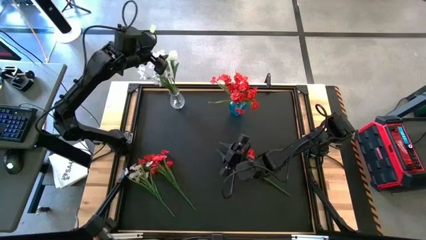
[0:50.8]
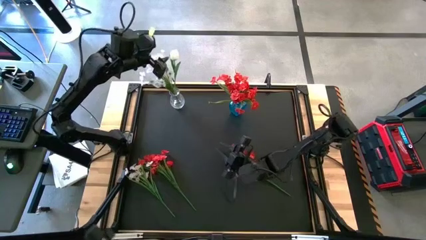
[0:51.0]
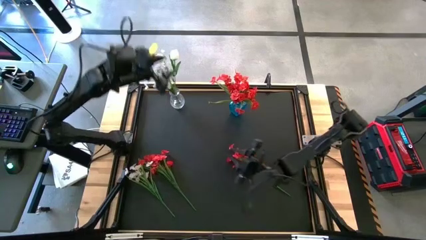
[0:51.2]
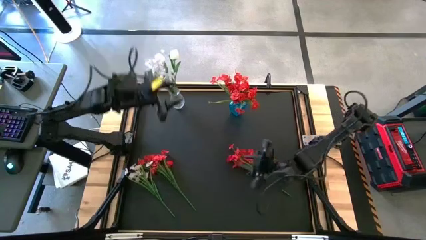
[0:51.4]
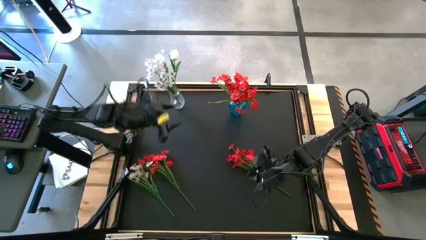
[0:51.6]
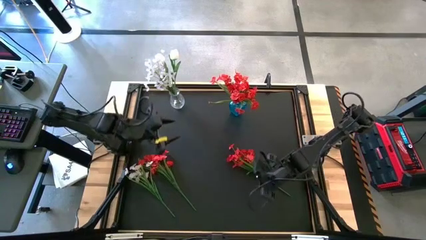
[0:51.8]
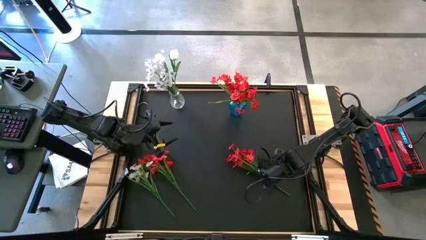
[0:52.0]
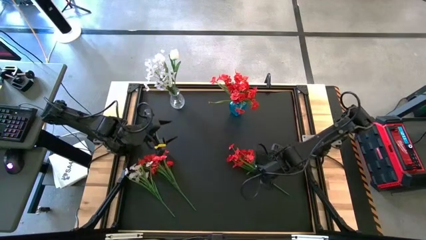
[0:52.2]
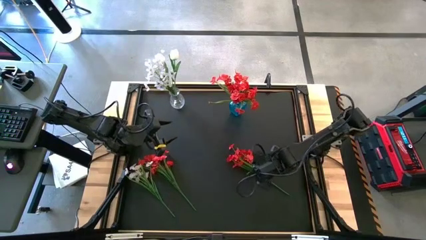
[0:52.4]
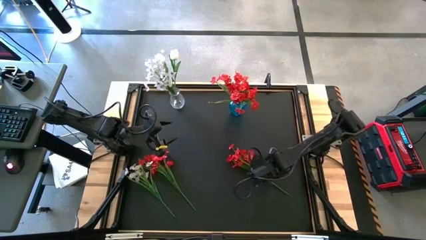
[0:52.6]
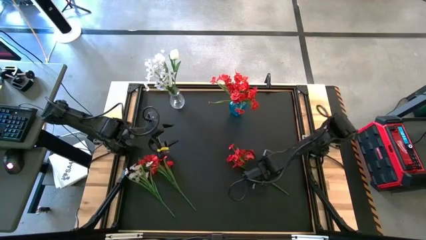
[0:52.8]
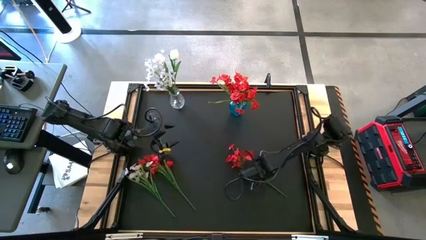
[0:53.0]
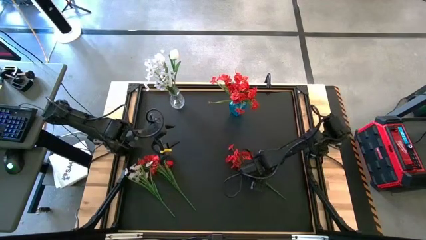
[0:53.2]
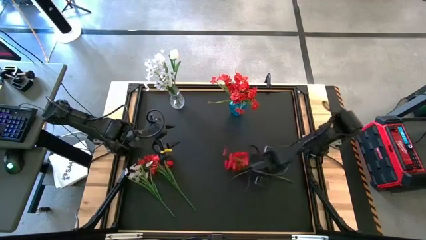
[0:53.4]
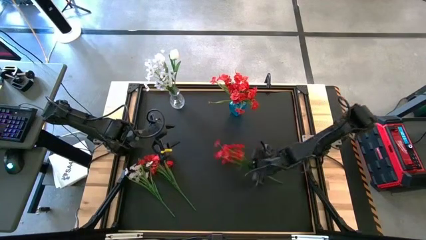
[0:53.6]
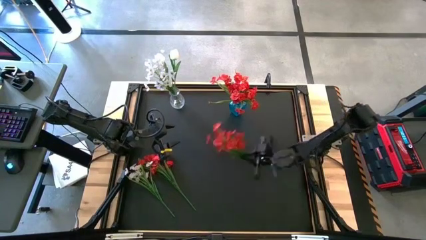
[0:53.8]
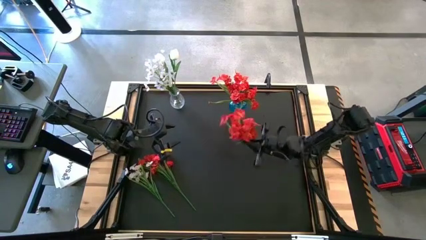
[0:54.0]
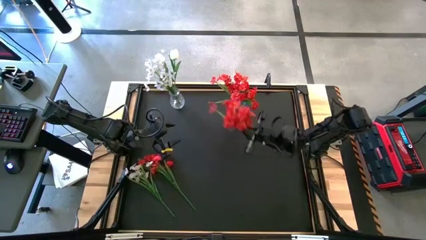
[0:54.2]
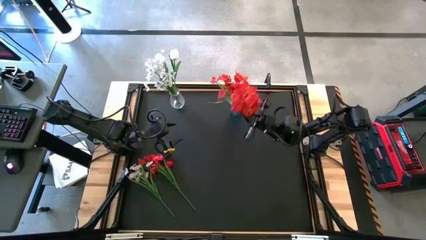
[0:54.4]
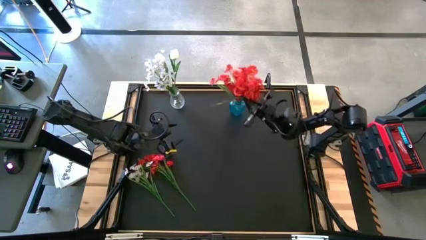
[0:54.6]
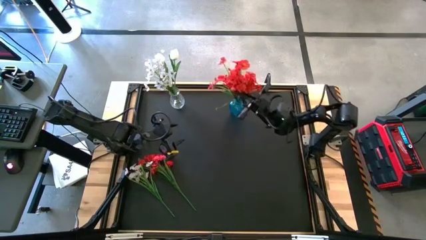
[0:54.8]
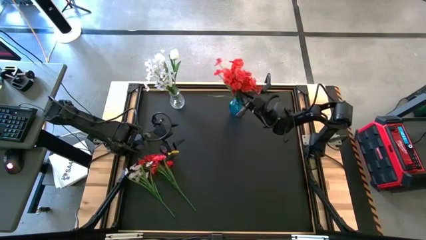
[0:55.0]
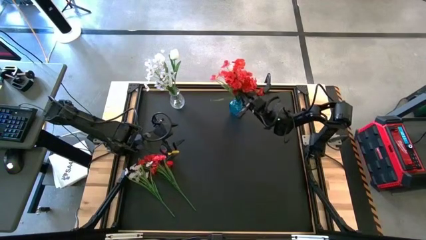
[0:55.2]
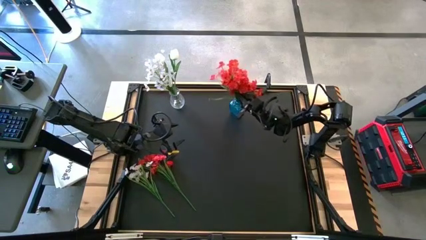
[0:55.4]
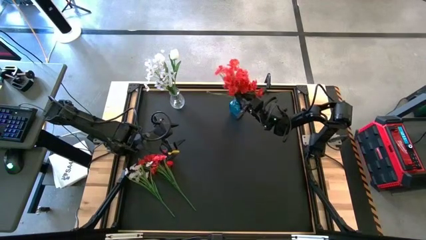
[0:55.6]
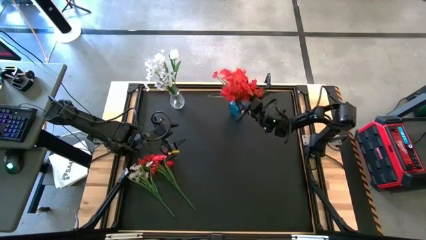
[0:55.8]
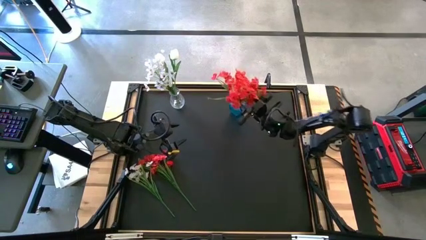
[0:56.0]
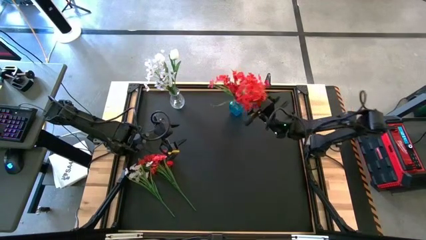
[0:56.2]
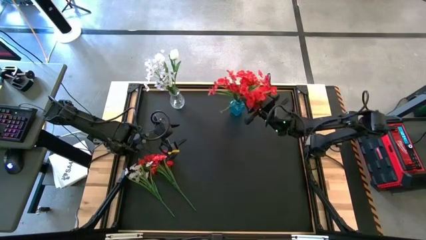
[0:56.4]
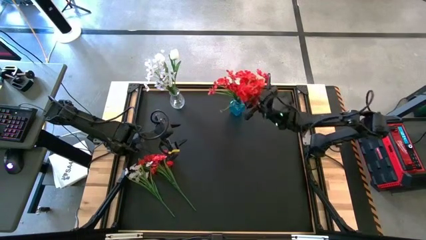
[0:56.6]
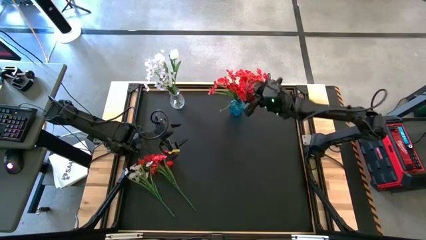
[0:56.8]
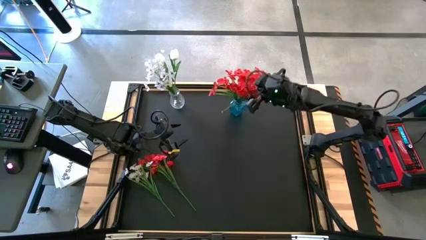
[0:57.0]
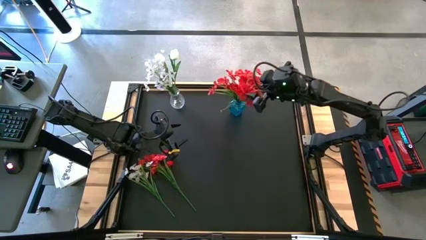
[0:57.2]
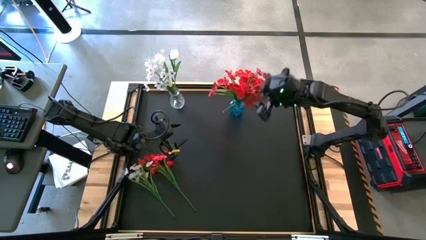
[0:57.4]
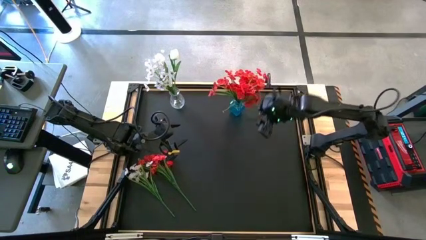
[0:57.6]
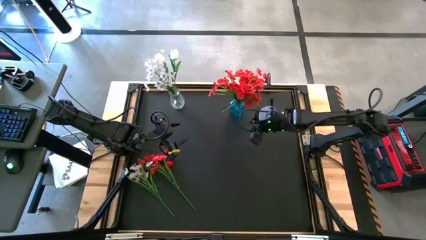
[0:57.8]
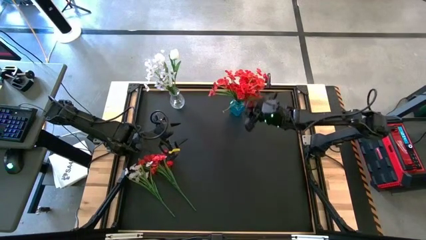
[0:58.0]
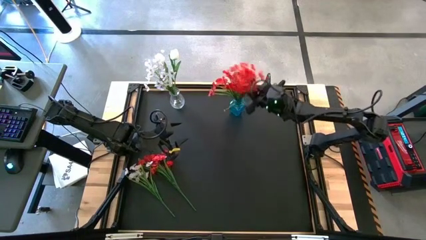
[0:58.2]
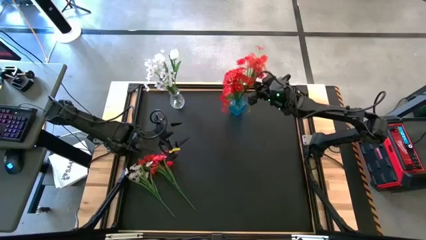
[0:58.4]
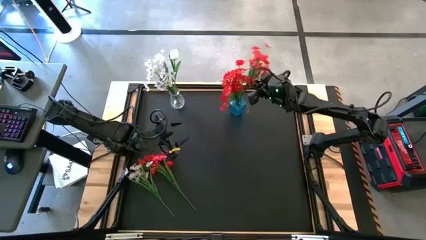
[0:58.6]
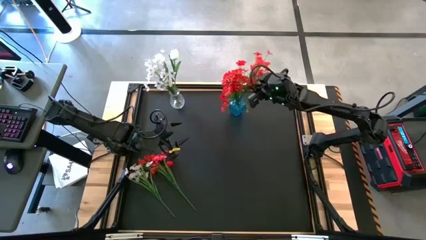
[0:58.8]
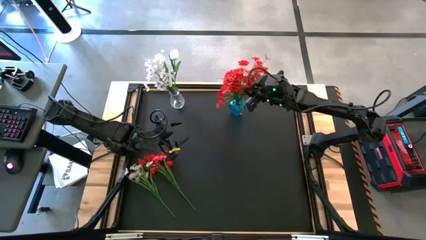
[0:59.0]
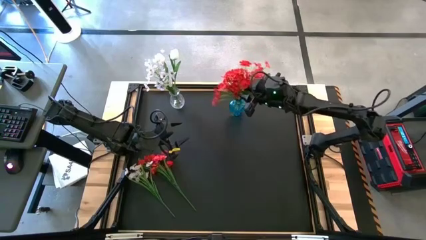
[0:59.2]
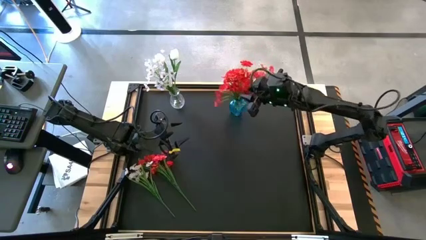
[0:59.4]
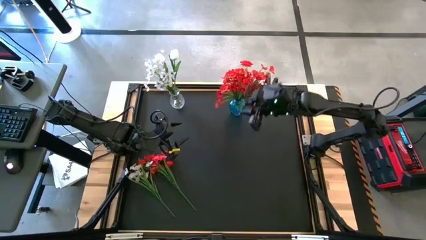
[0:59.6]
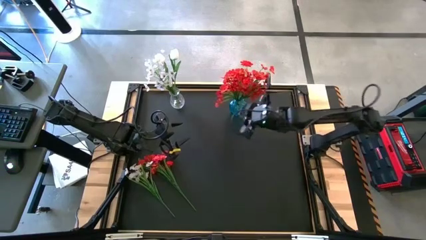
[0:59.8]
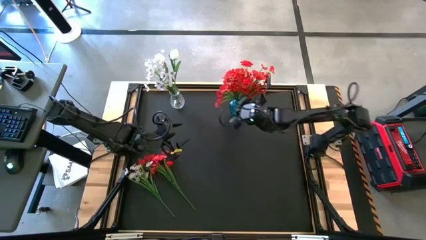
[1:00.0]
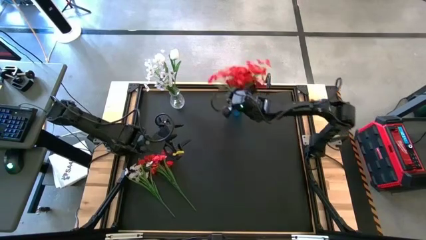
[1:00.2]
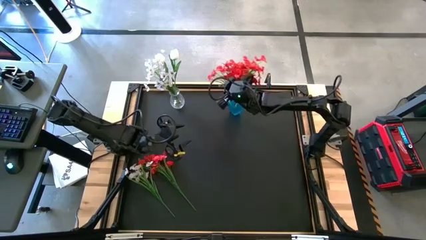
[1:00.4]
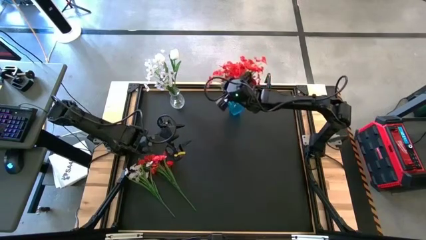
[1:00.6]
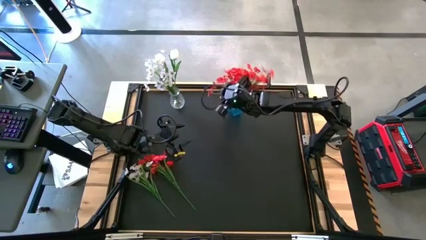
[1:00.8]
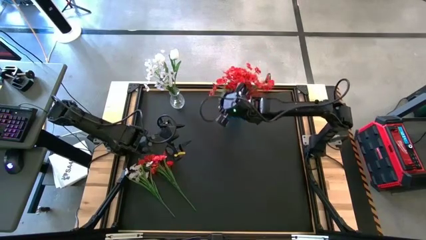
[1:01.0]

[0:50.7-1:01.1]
Task: Sort flowers into vase by color
Put the right red flowers into the blue vase

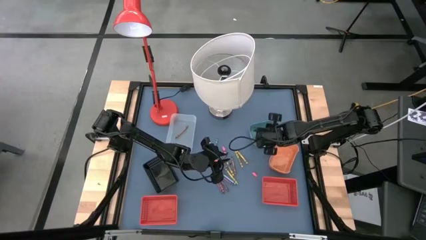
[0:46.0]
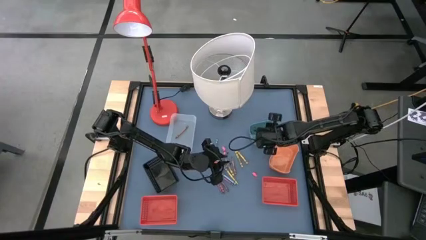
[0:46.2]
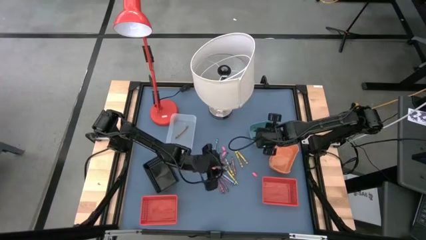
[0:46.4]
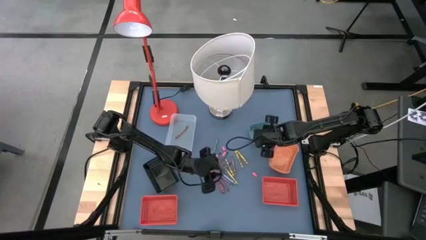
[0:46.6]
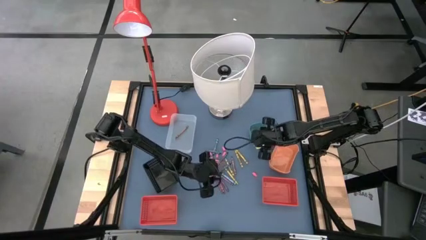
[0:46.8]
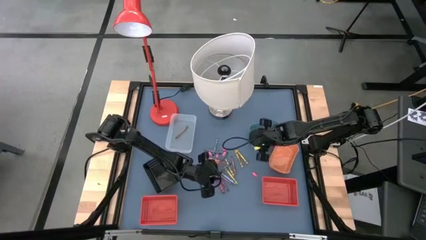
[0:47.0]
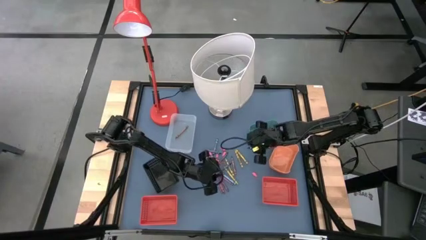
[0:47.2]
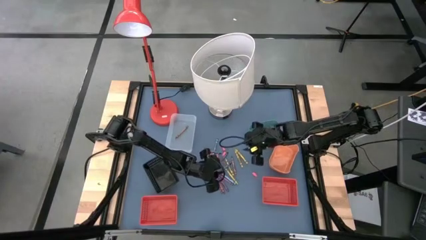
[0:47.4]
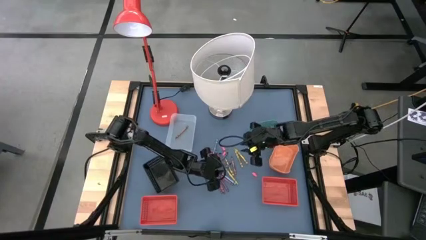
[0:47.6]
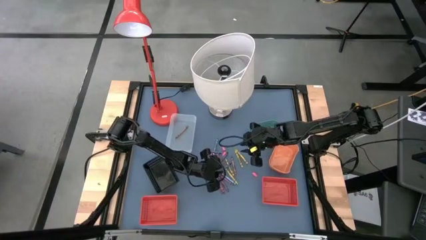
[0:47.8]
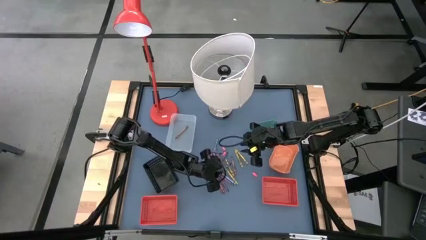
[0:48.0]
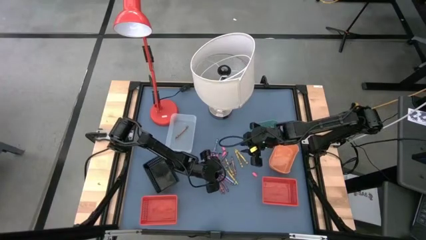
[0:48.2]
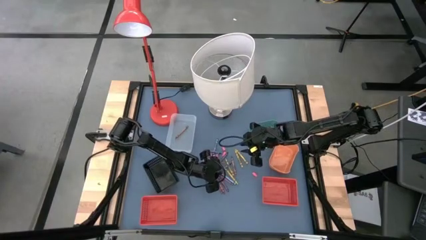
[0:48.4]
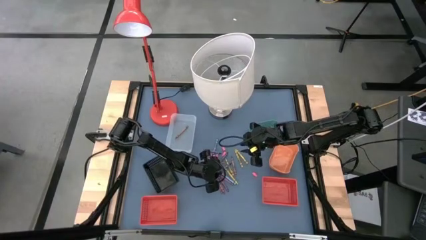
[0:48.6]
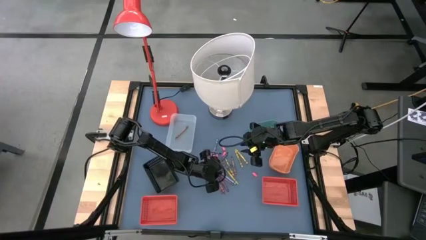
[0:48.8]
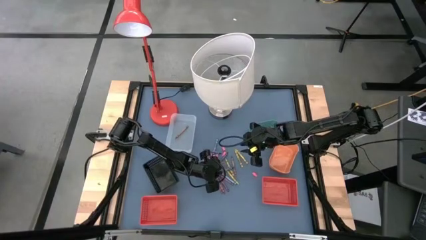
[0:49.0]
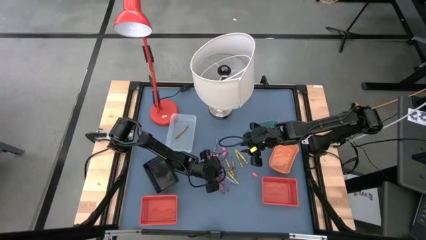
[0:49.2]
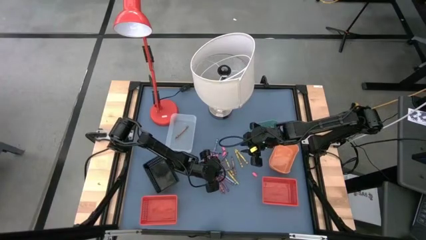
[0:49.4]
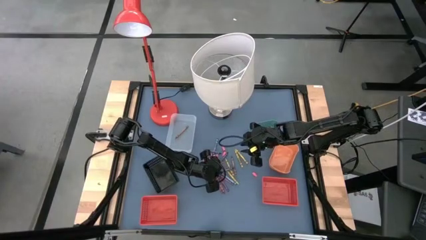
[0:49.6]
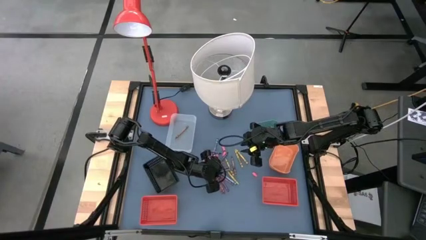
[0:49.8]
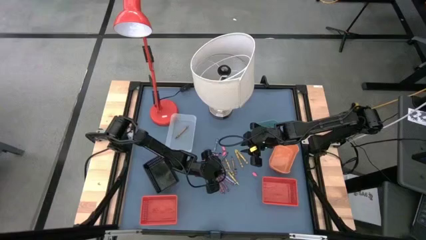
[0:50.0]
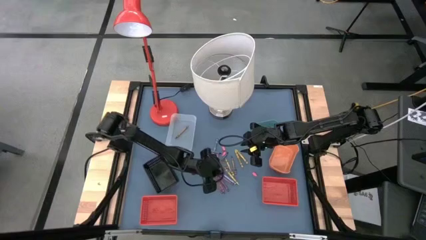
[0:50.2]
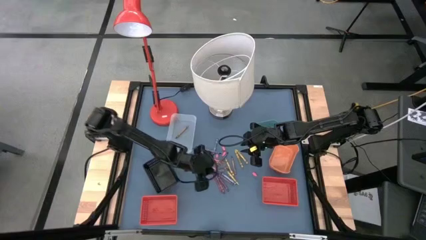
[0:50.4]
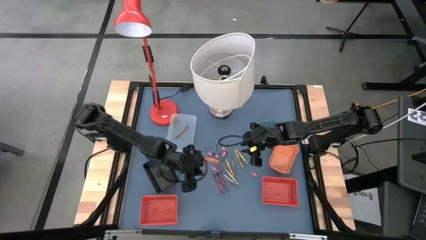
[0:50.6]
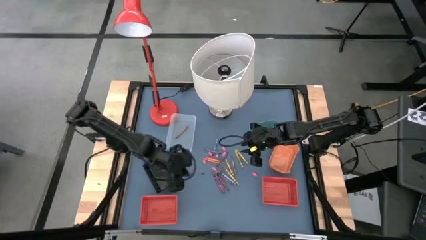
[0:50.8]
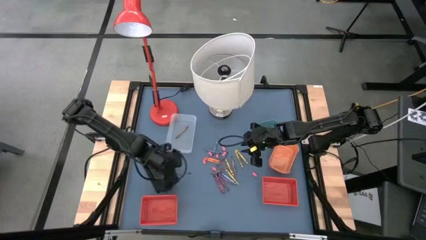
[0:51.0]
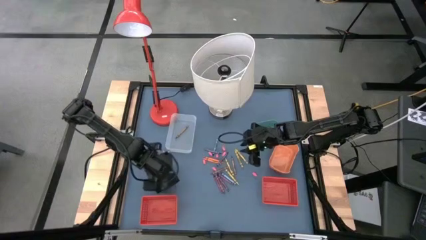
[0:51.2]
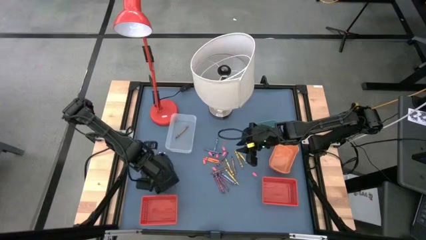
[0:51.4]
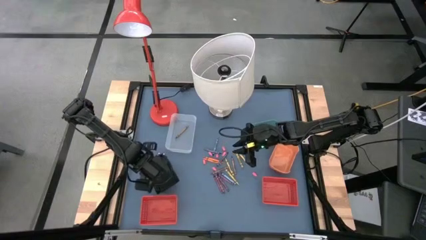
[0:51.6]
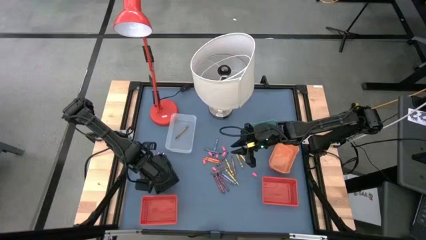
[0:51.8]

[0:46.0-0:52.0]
Task: Sort crayons
Put the dark blue crayon into the black bin
